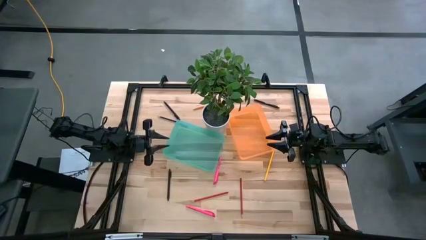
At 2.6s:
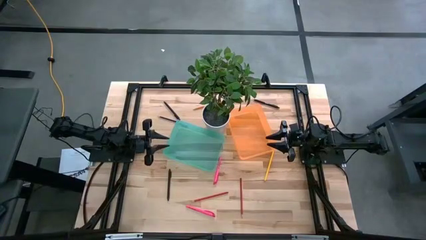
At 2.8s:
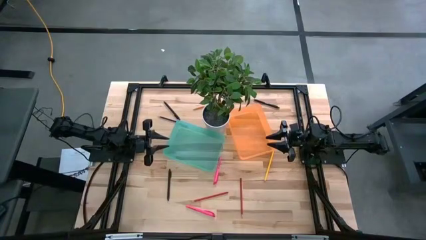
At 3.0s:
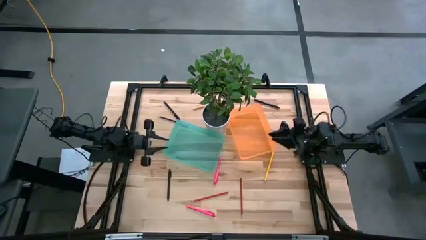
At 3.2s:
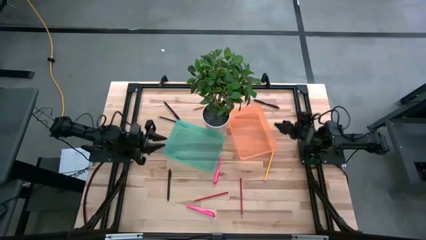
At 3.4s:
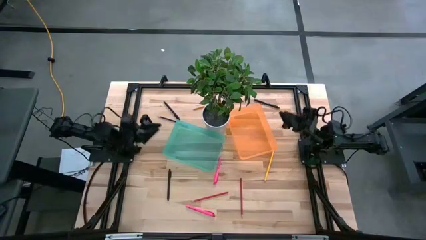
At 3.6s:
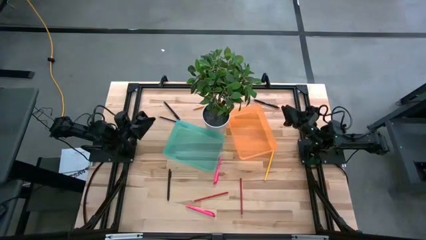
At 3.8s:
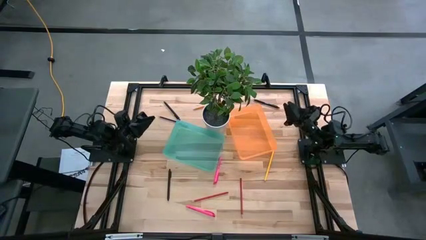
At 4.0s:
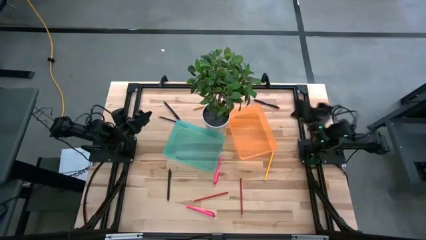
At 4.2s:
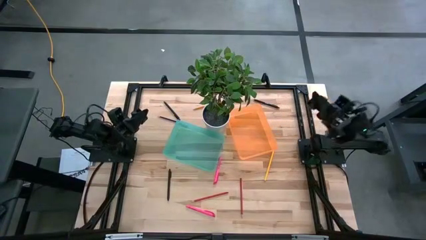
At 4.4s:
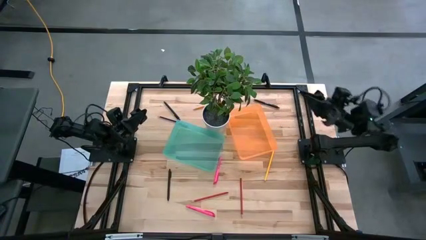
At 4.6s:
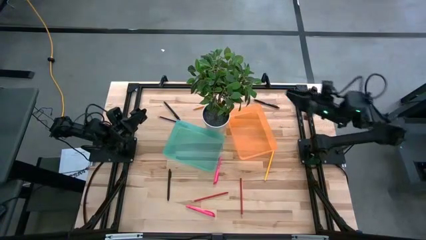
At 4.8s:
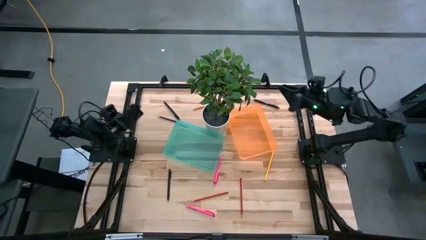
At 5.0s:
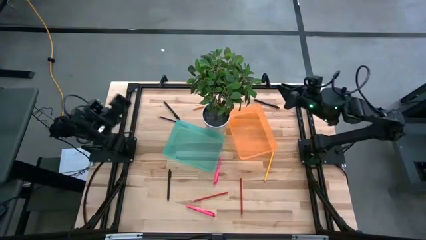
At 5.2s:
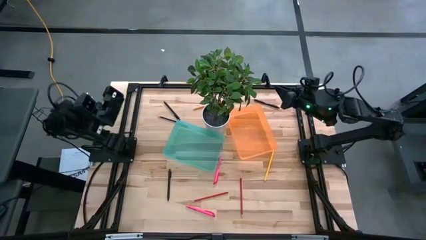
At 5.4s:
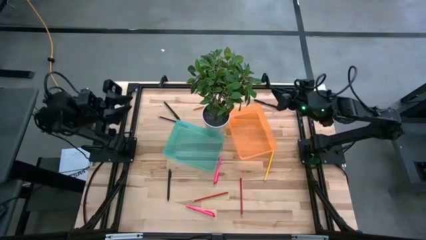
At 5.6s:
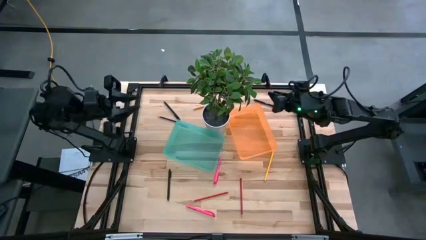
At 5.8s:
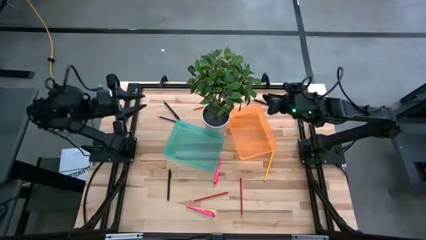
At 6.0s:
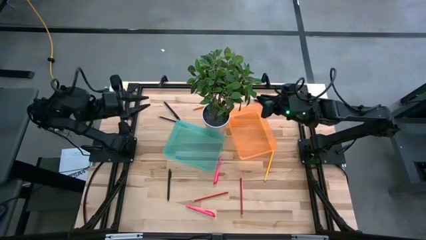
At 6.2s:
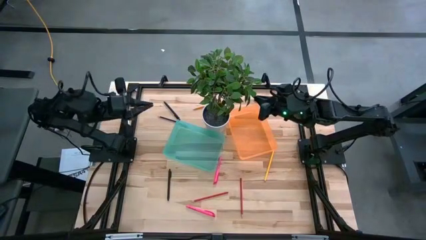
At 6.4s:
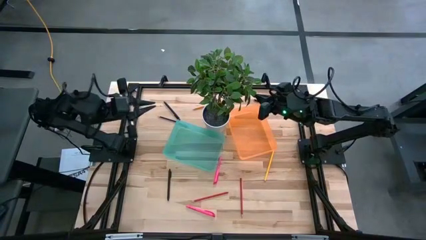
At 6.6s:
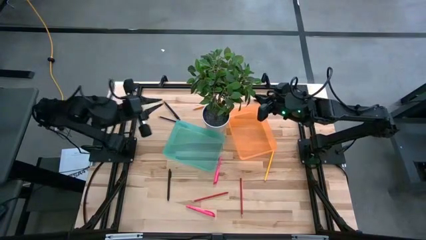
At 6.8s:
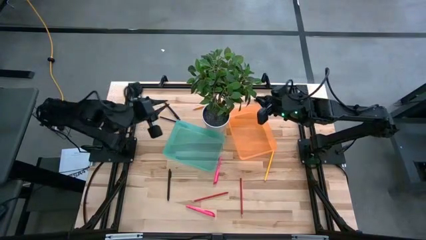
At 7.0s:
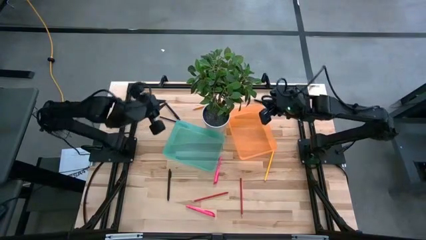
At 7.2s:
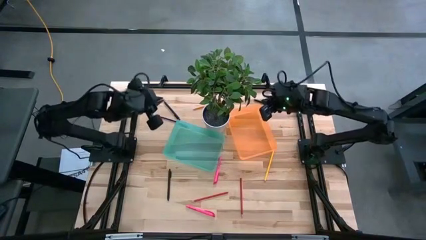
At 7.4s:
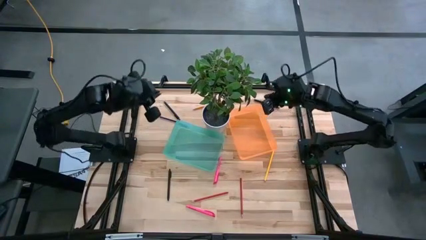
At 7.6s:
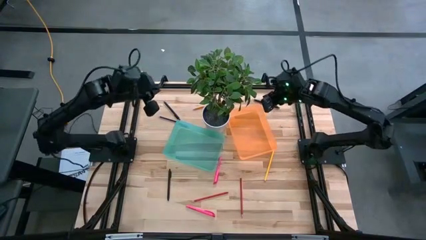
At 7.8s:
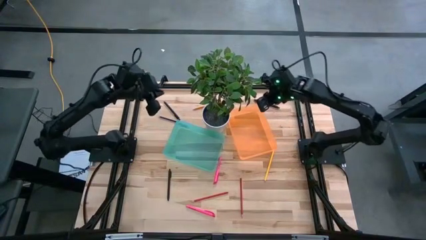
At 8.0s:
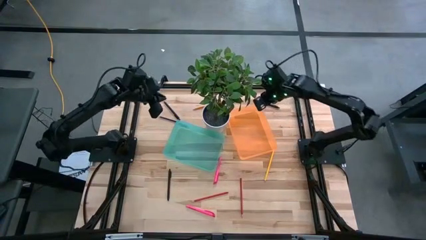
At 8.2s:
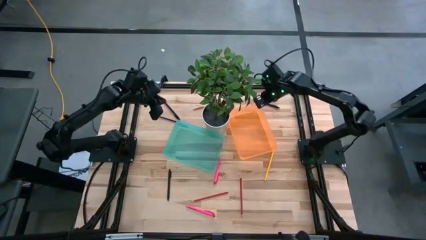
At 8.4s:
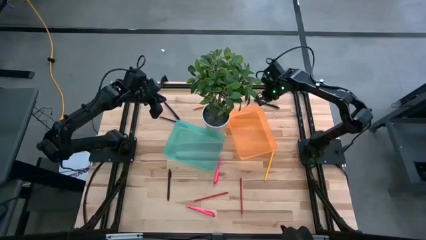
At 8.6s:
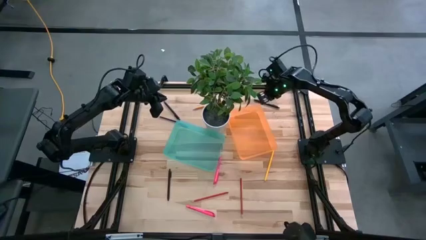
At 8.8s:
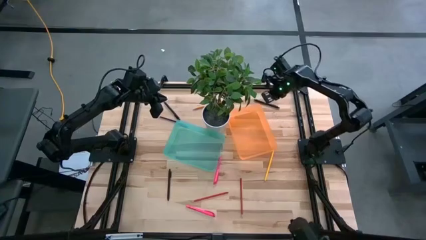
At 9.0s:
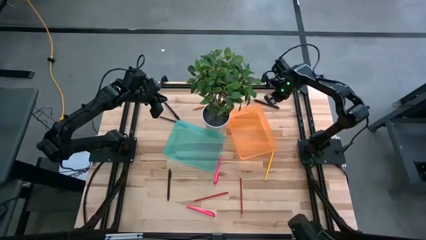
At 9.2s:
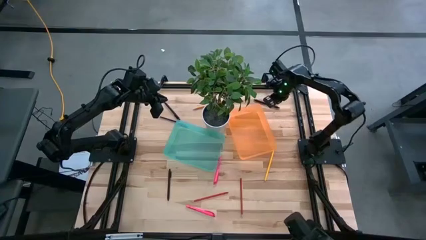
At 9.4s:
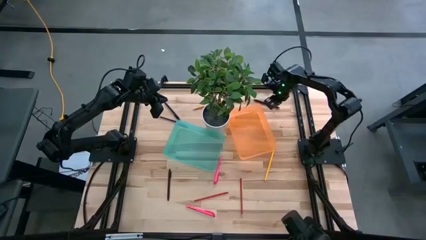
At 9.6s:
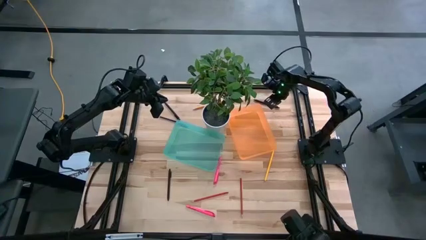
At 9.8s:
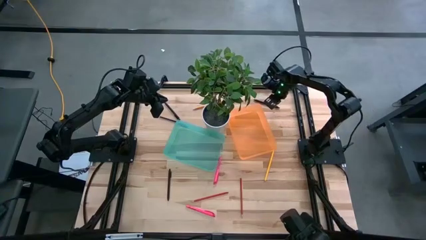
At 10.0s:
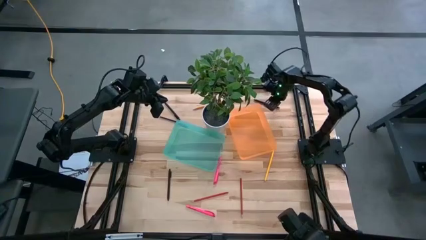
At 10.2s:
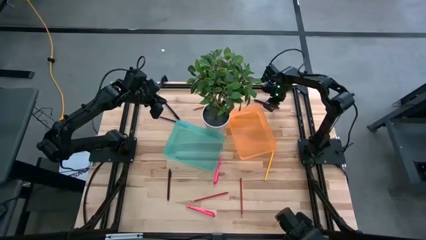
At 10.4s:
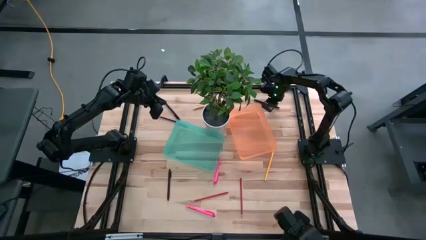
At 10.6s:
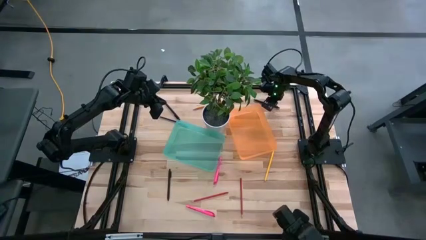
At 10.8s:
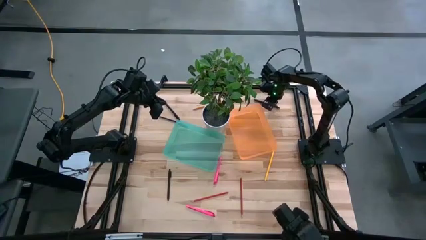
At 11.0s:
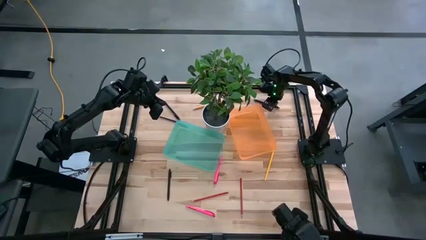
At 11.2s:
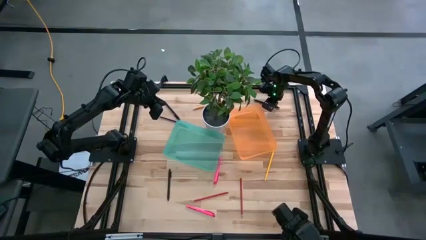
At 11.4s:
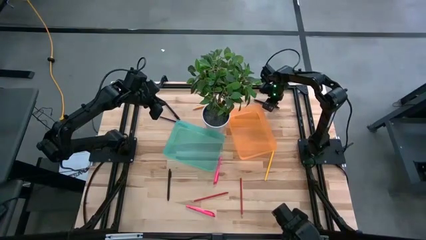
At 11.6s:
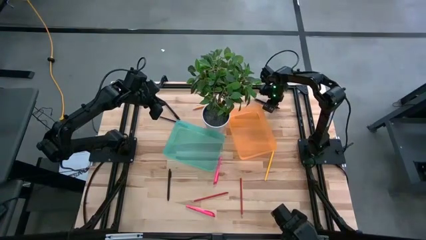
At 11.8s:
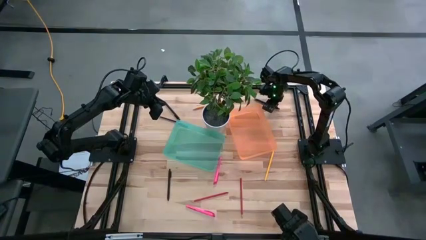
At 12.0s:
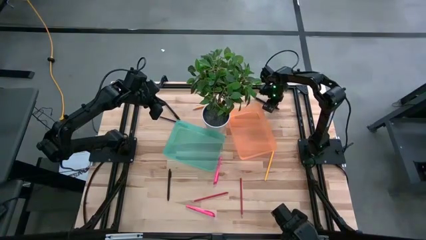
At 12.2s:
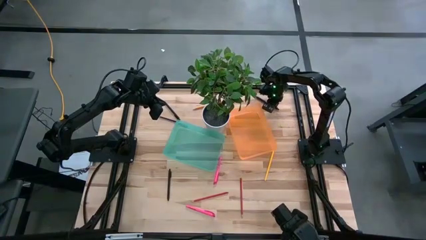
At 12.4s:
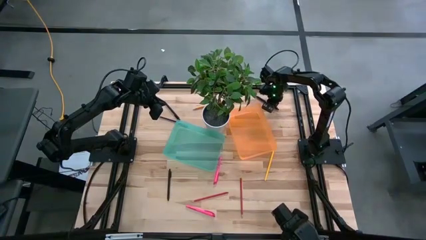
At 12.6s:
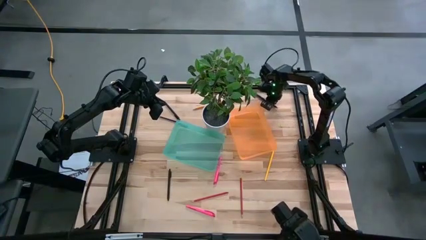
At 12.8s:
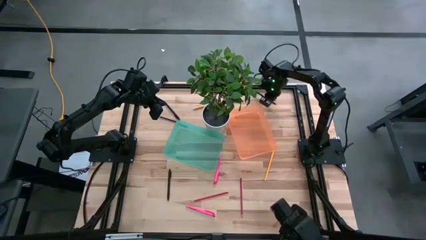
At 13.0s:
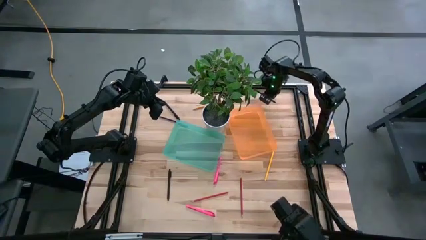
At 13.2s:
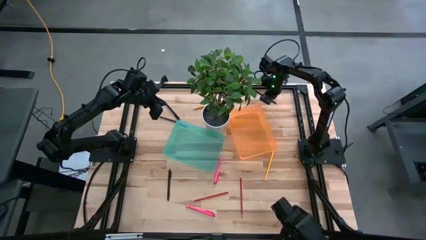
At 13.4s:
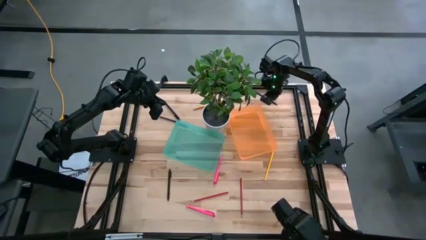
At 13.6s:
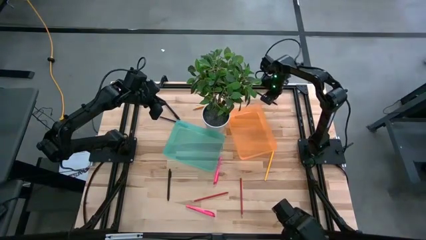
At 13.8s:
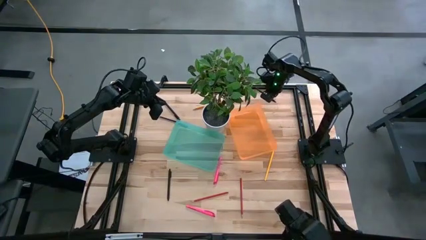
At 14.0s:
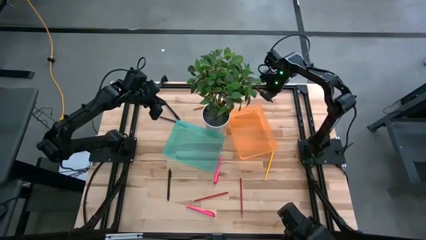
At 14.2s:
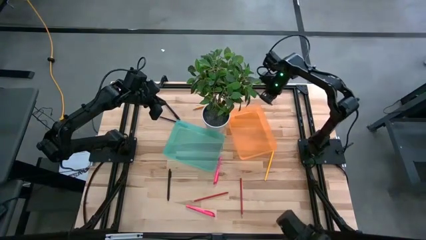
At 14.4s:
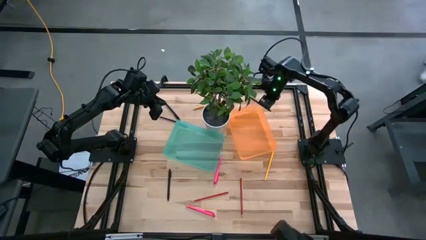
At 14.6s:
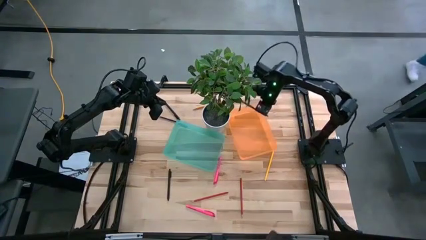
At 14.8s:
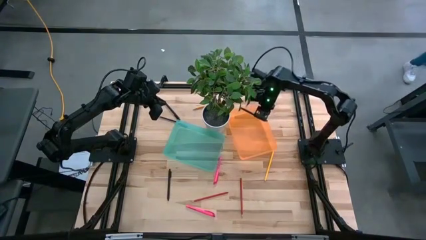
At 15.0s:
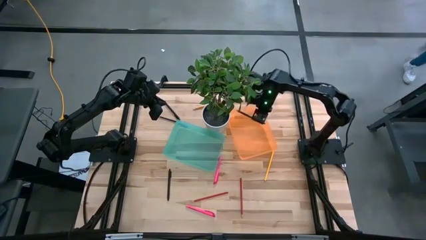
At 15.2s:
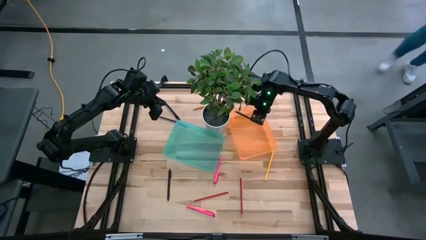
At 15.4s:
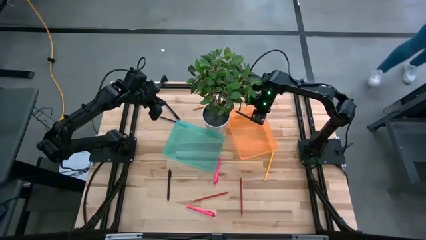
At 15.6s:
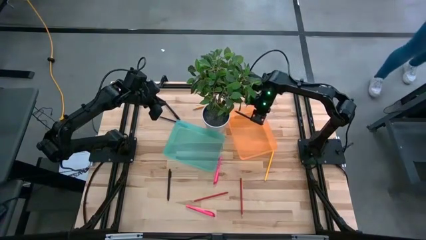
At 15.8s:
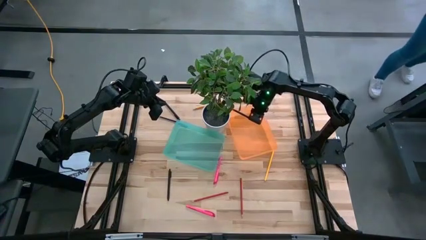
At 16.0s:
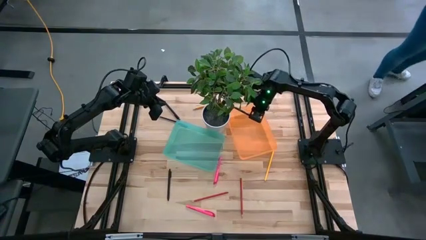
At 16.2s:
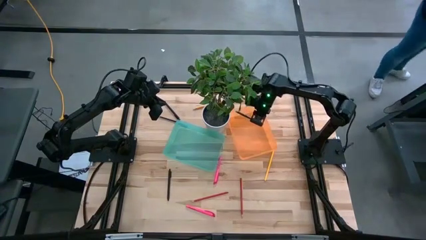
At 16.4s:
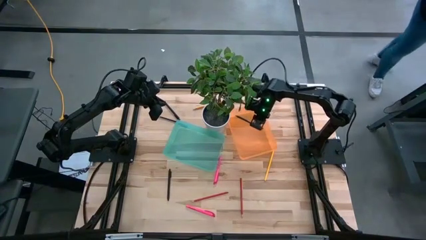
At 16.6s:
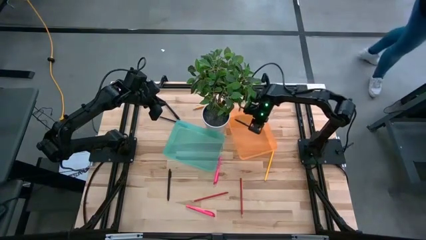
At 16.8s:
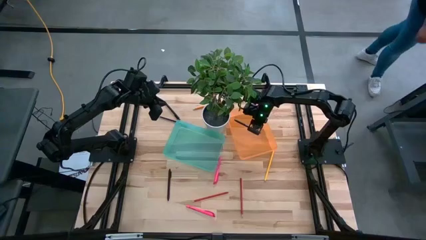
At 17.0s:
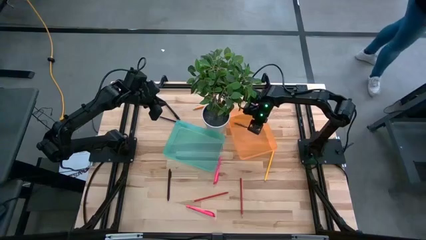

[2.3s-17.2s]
Task: Sort pens & pencils
Put the top right black pen into the orange bin
